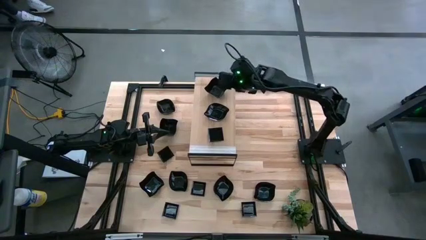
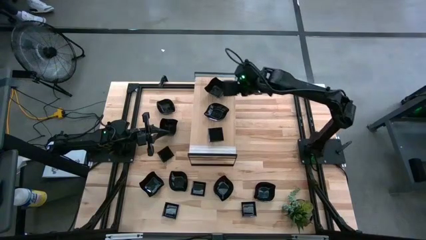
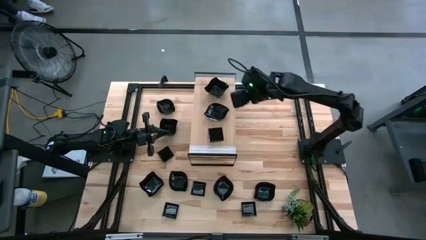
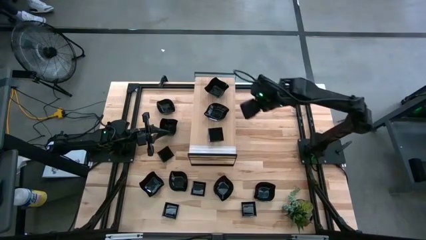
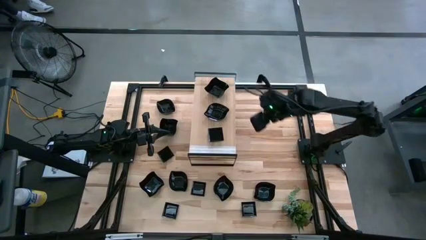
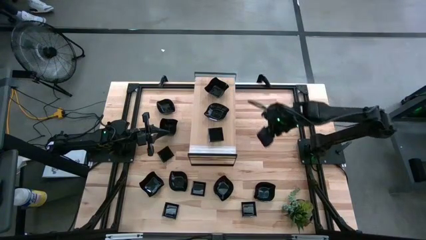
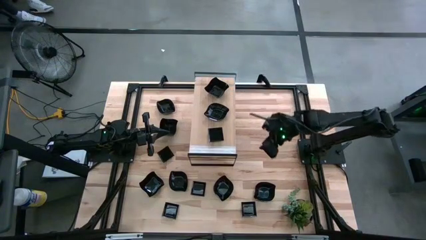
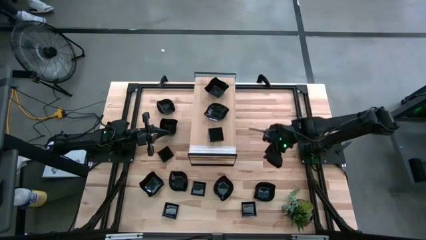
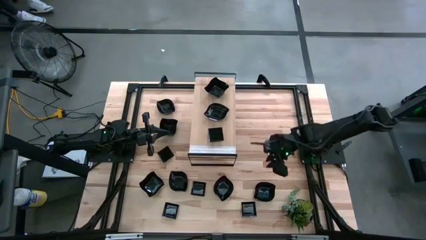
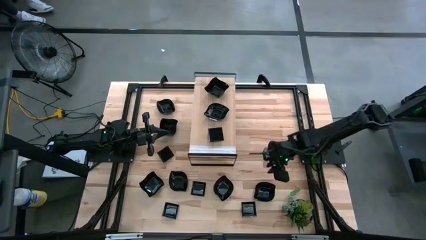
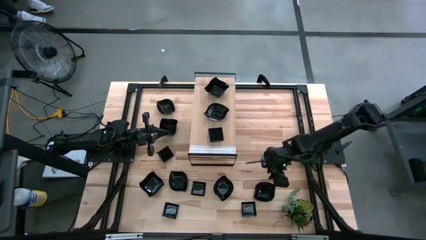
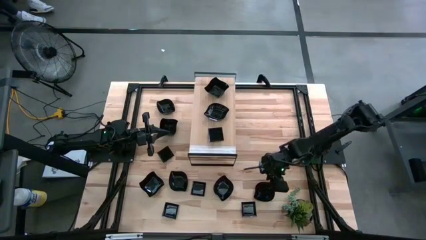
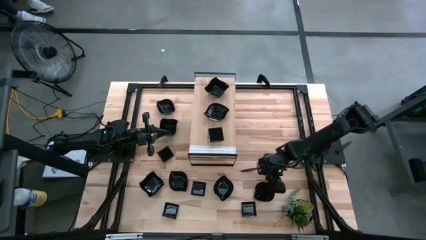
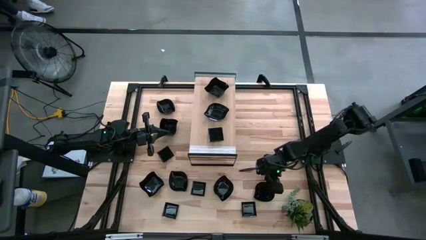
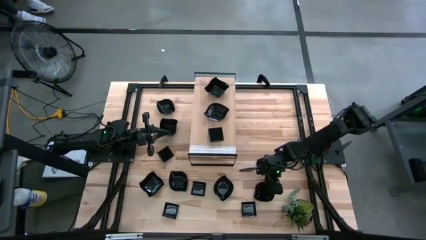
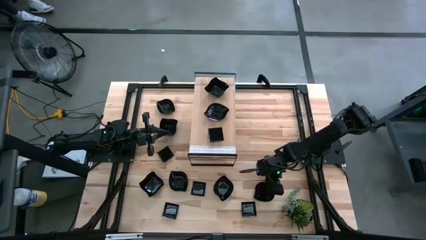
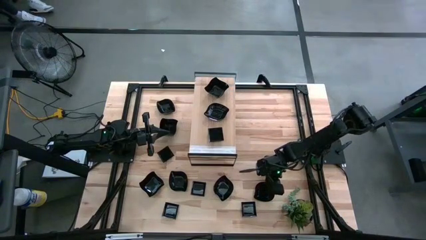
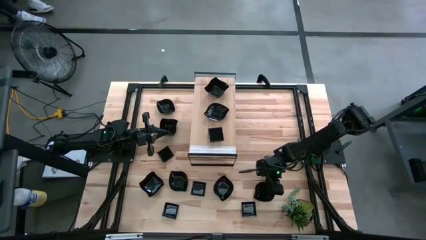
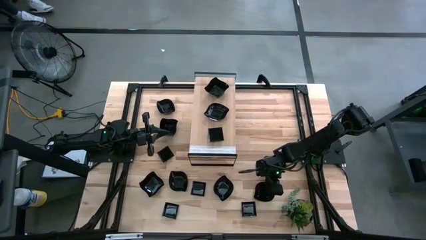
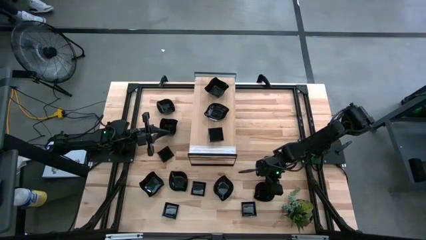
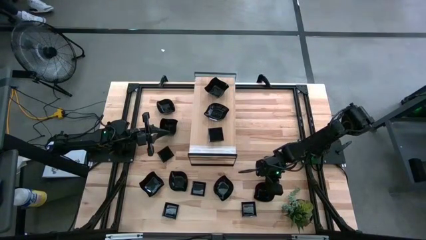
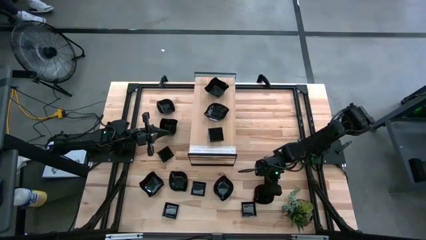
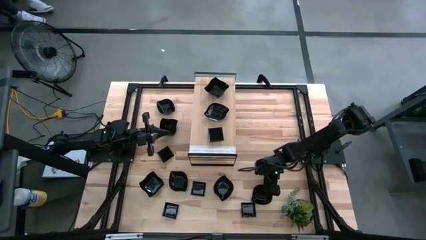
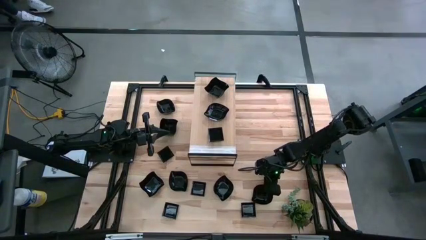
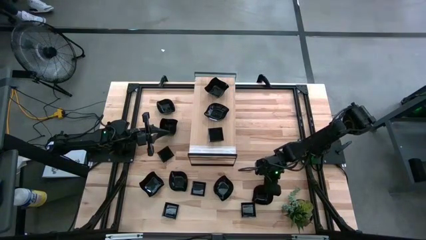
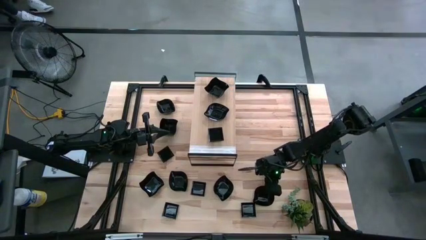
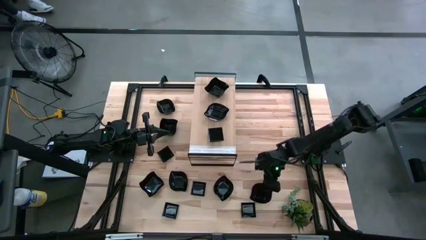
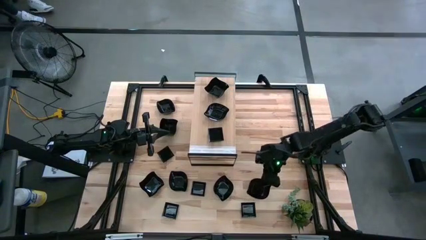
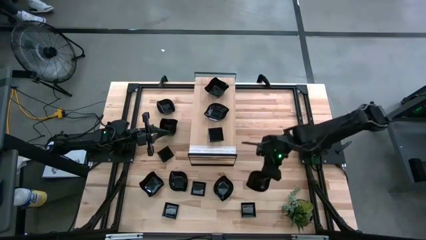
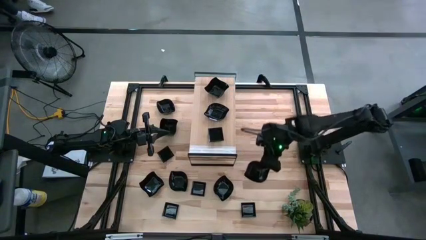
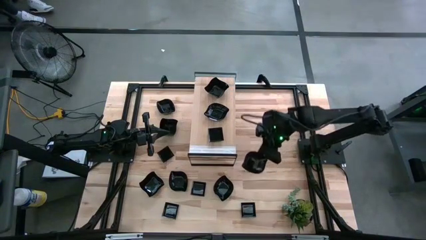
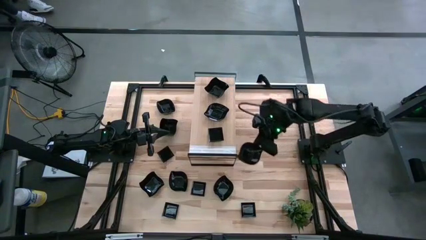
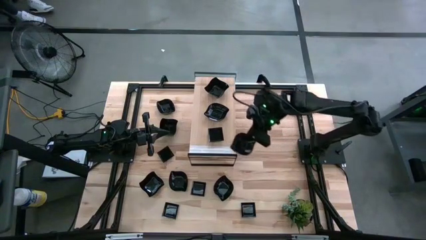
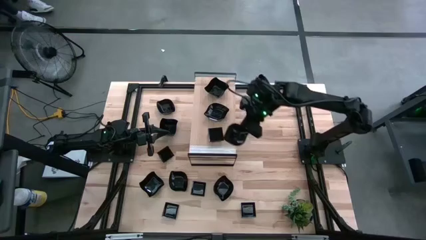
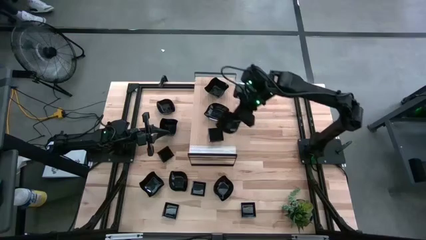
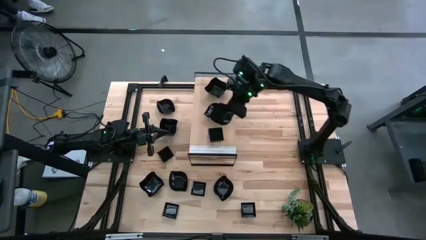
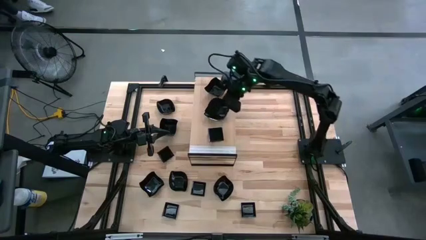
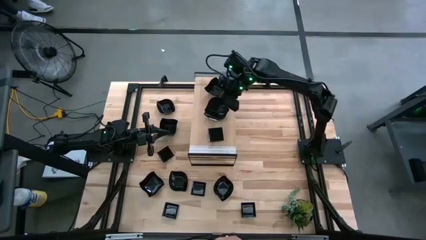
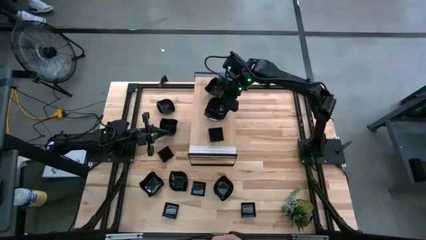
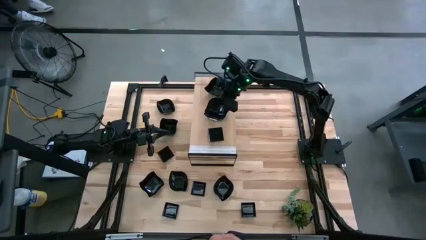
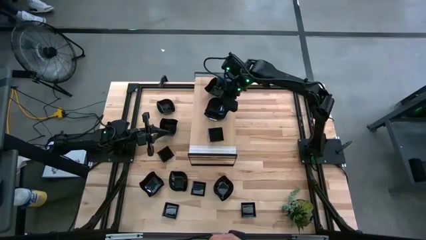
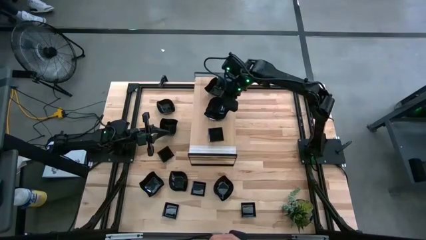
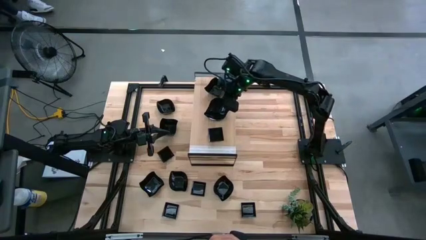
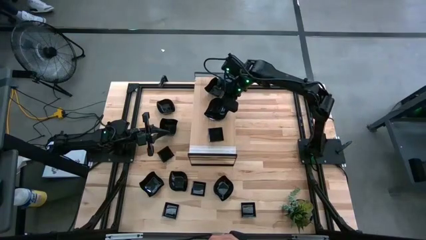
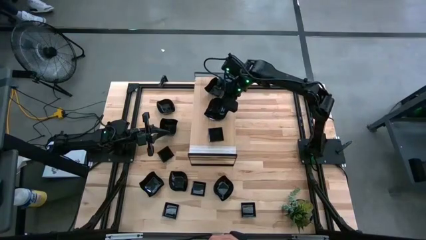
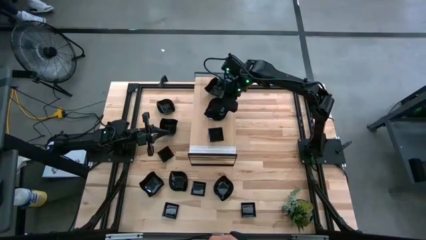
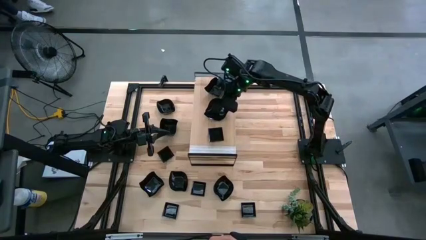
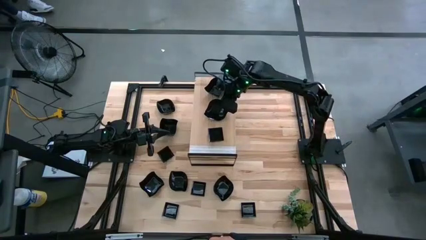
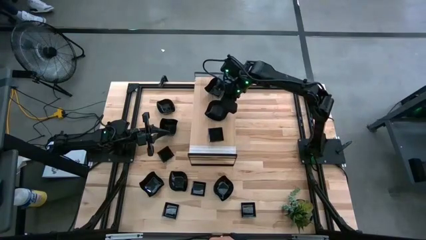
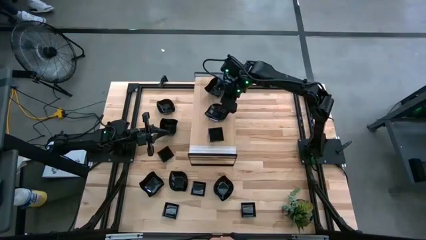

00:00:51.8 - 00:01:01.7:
Task: Pick & Place Mini shaped plates
Stack the leaf-shaped plate on top of the leaf-shaped plate on the shelf

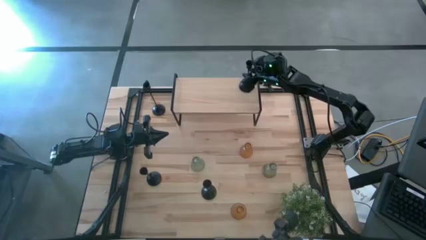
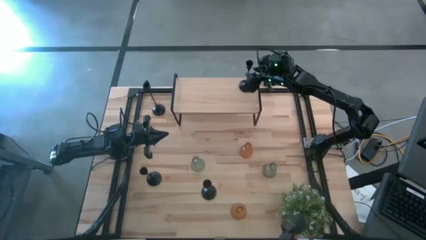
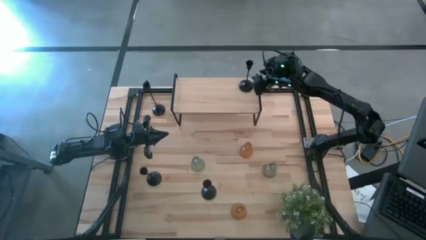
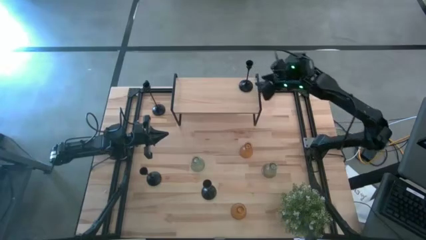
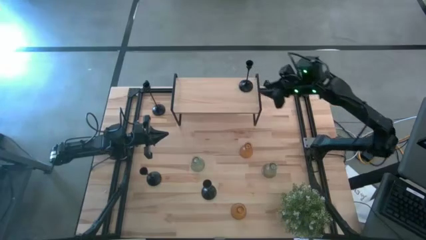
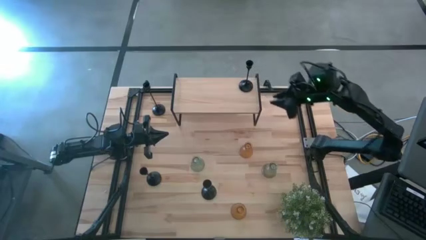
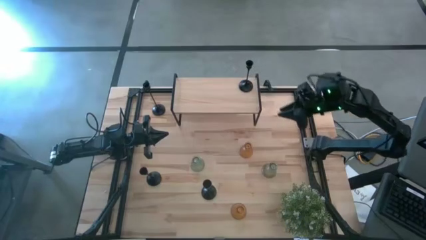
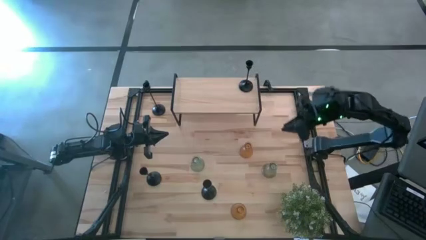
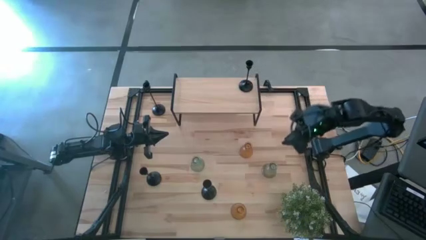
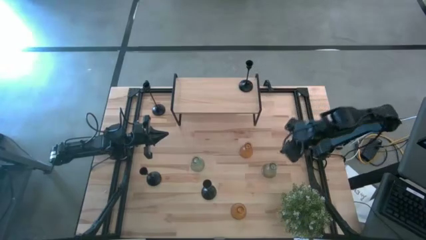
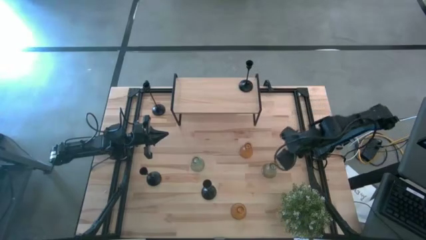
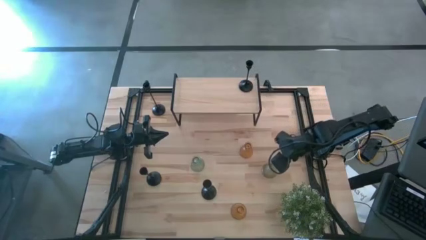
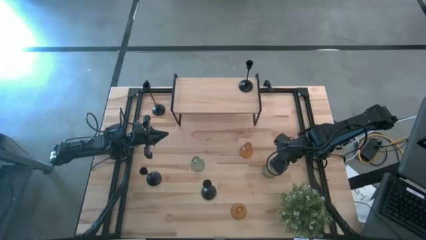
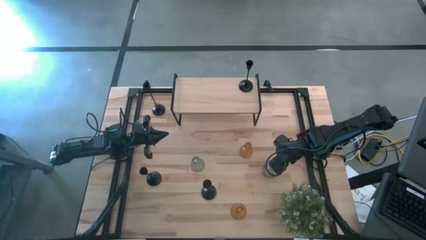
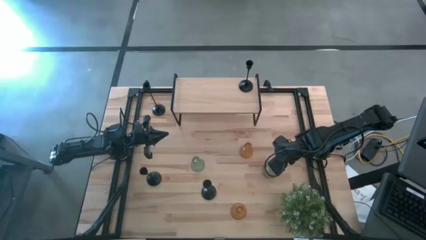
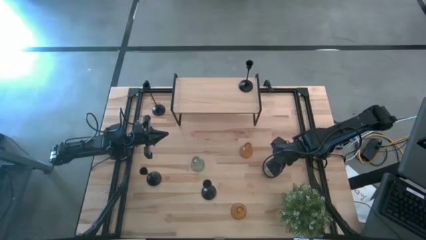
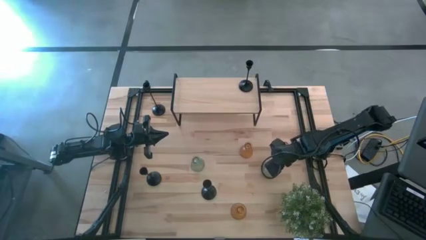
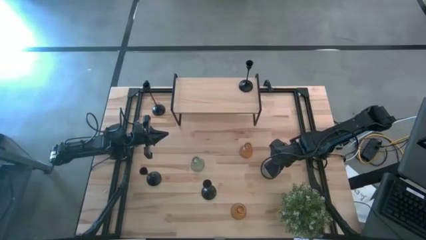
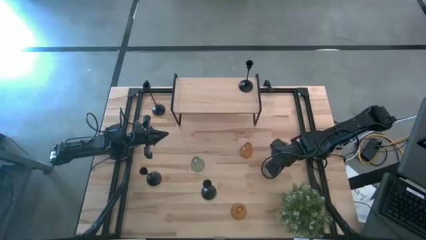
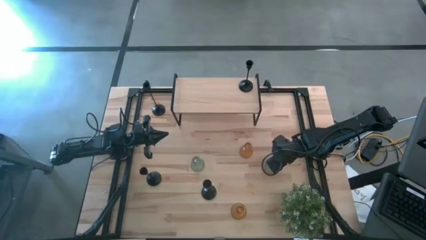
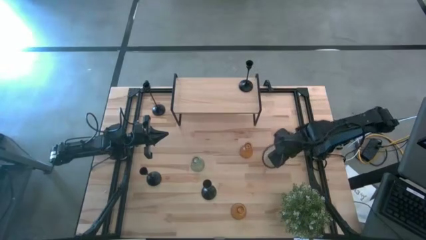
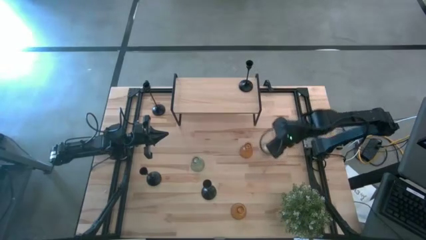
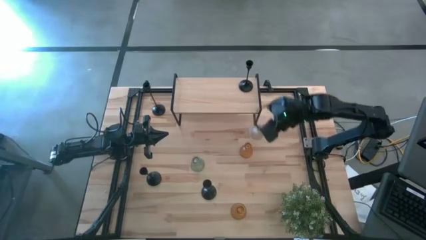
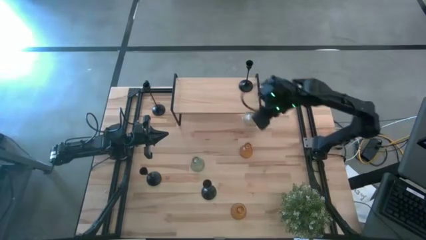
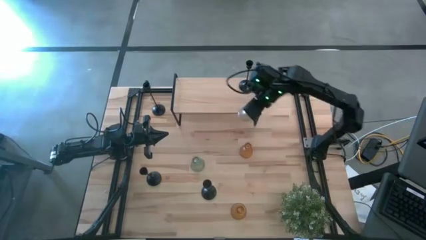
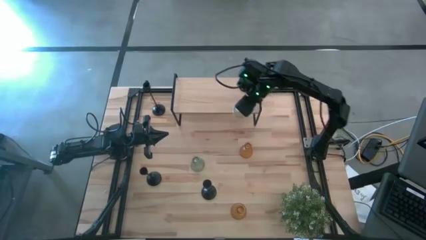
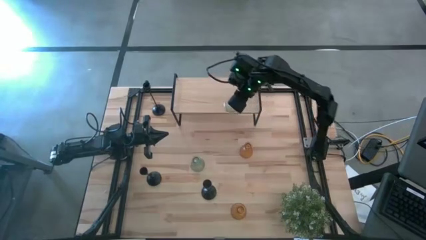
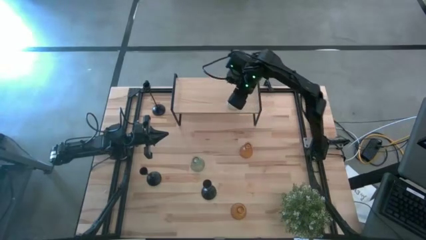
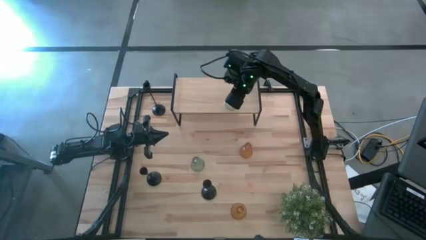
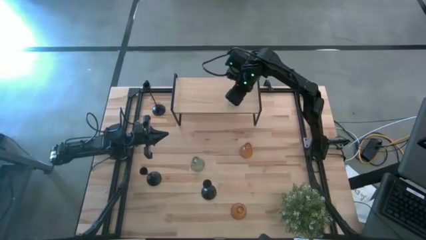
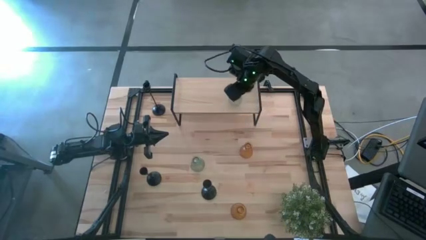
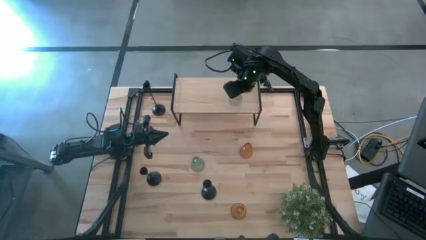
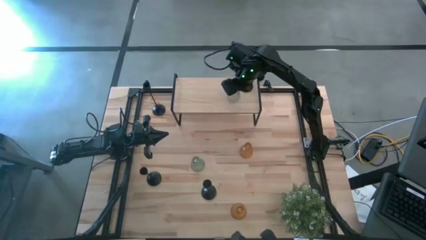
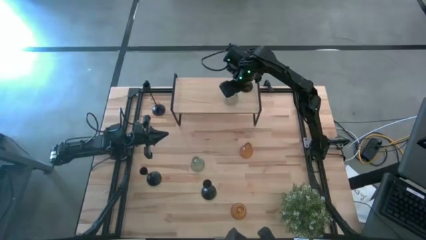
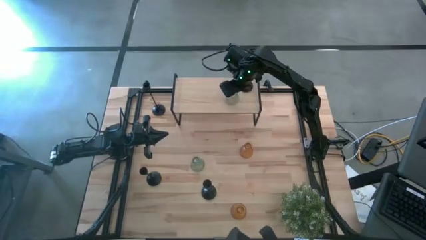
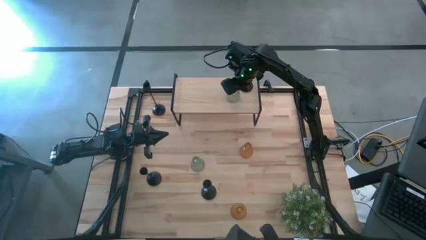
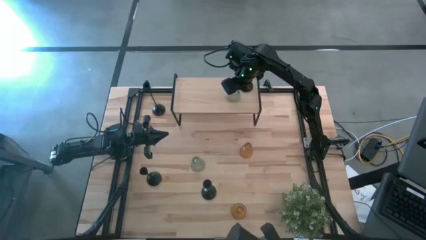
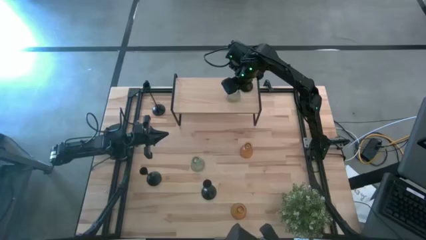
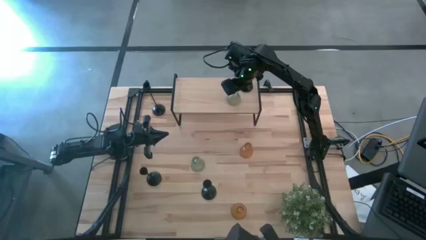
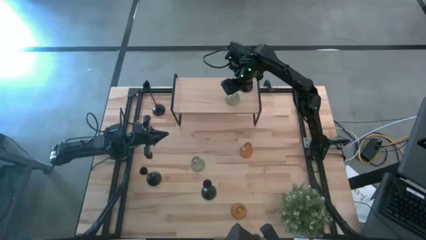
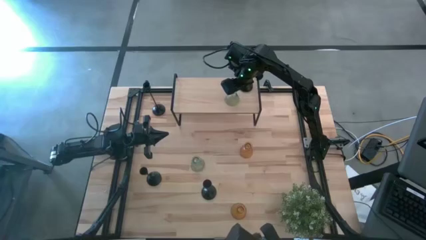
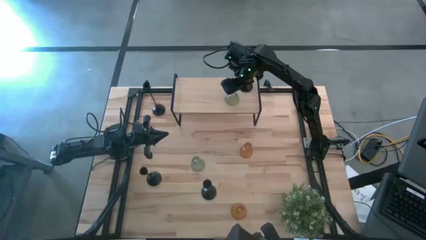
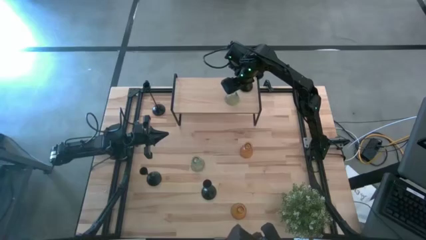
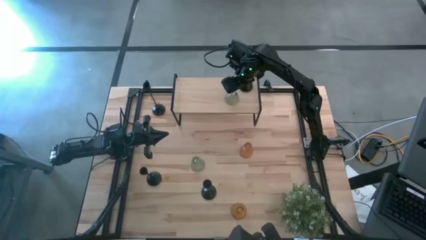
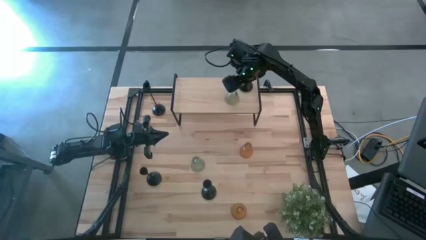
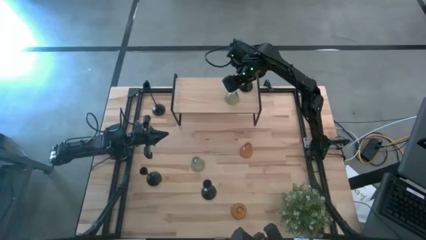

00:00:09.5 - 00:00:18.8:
Task: Pick & Place candle stick holders
Put the green glass candle holder on the shelf
